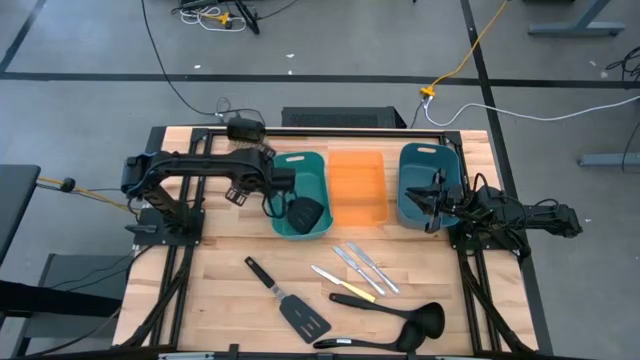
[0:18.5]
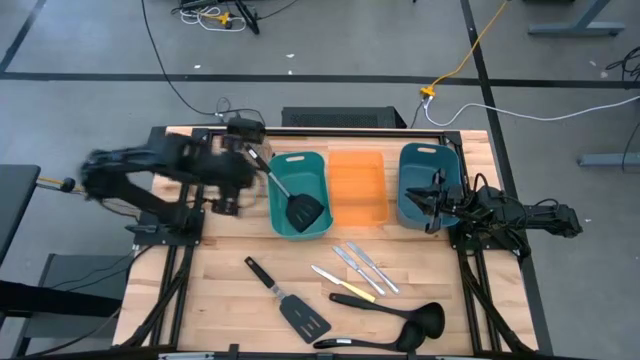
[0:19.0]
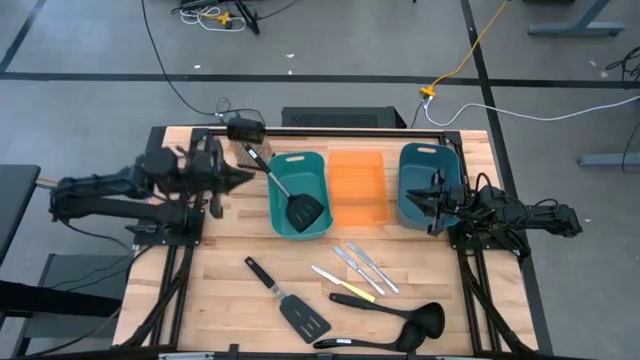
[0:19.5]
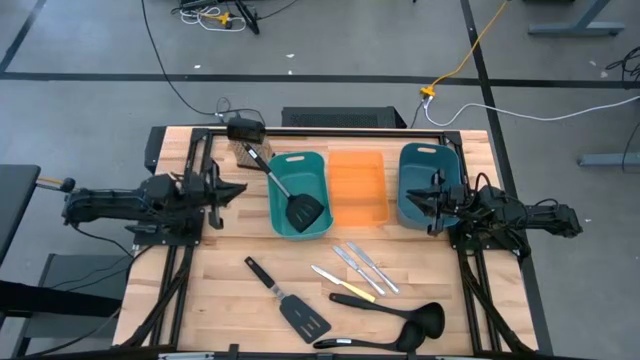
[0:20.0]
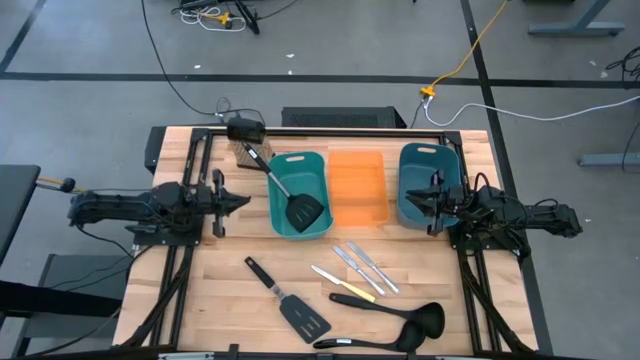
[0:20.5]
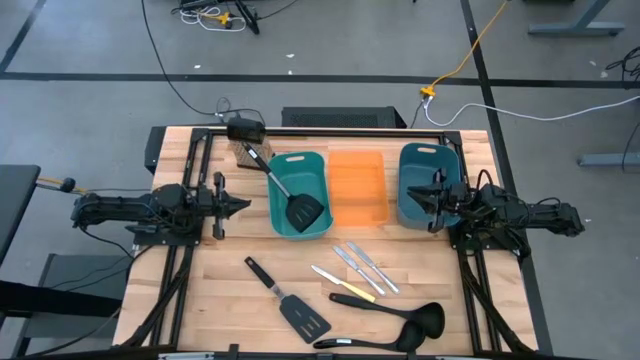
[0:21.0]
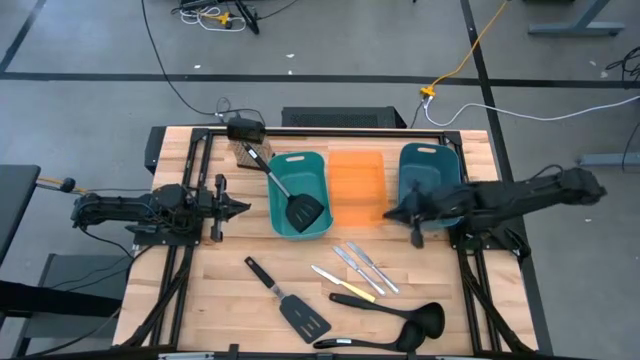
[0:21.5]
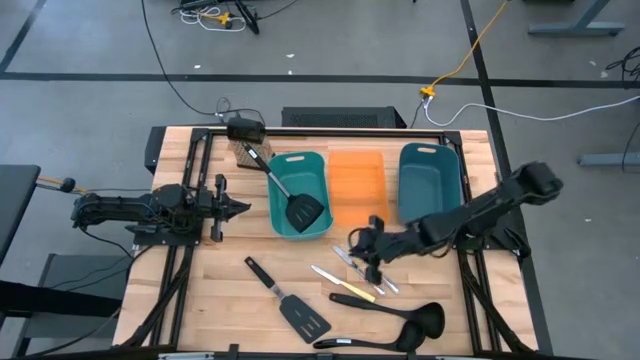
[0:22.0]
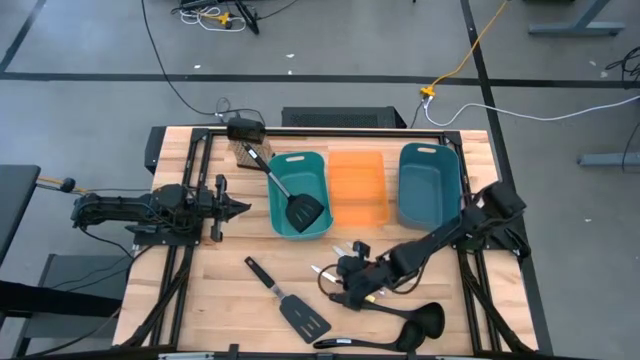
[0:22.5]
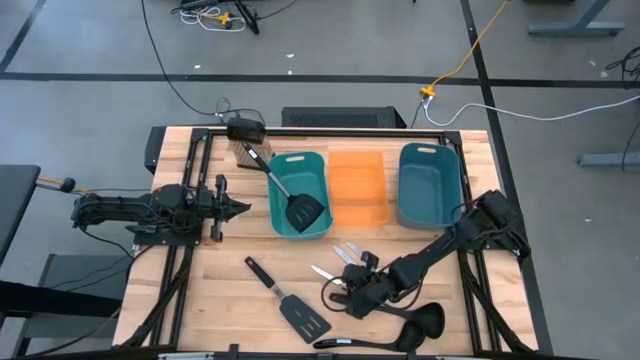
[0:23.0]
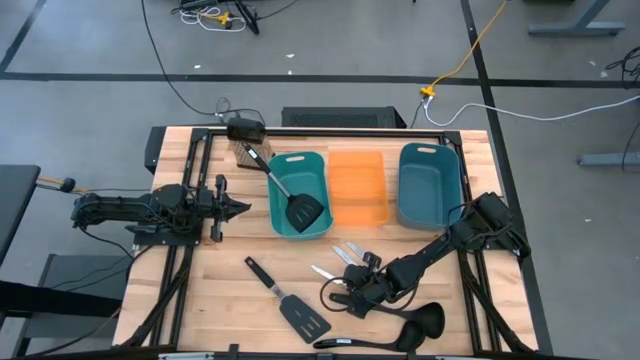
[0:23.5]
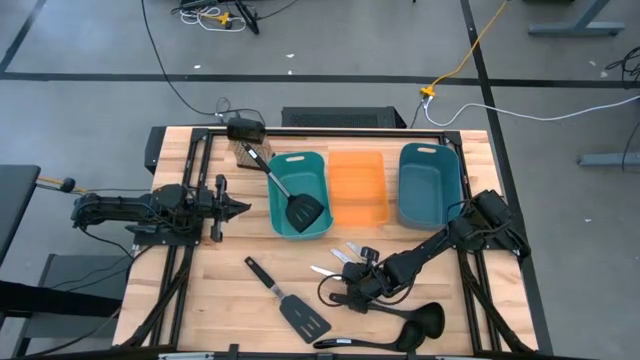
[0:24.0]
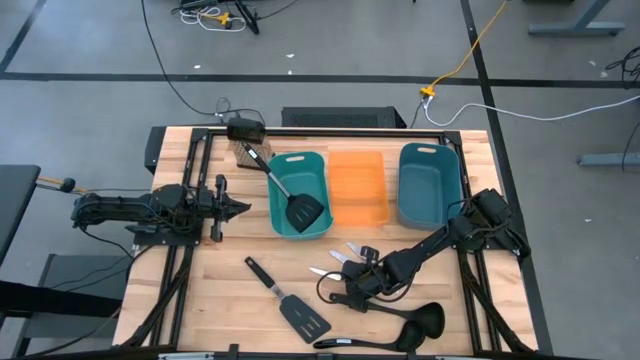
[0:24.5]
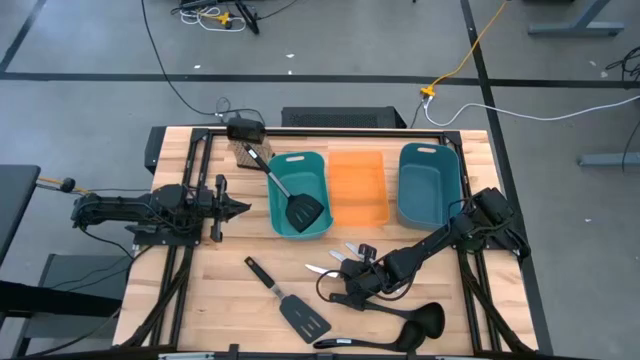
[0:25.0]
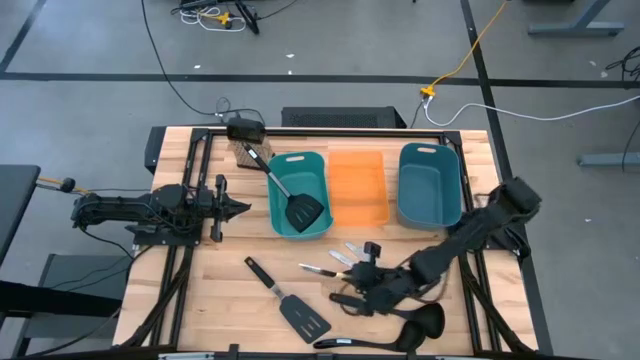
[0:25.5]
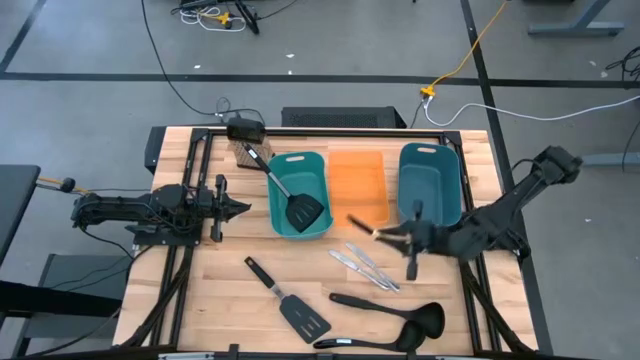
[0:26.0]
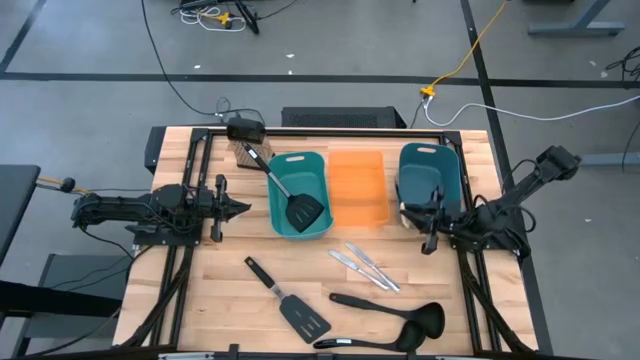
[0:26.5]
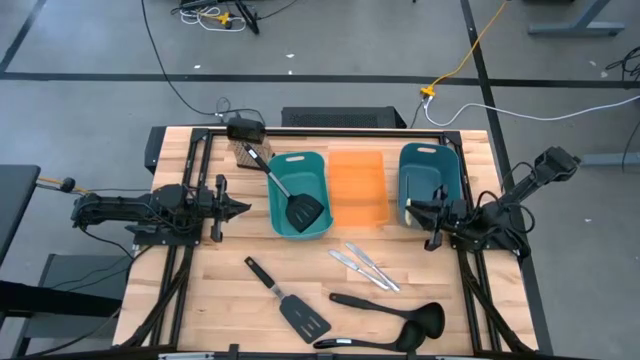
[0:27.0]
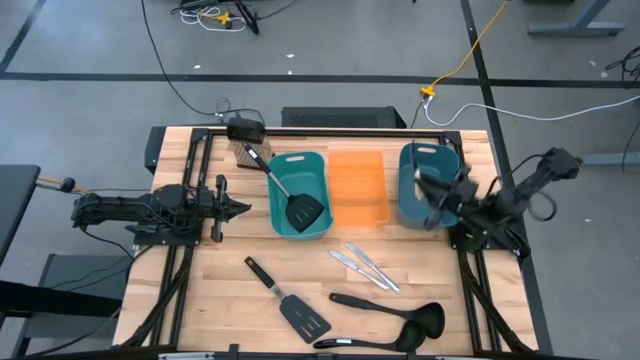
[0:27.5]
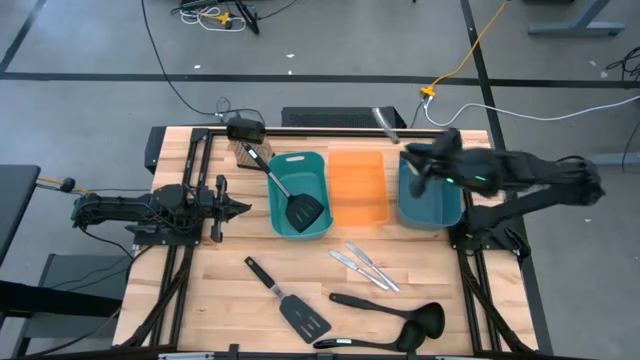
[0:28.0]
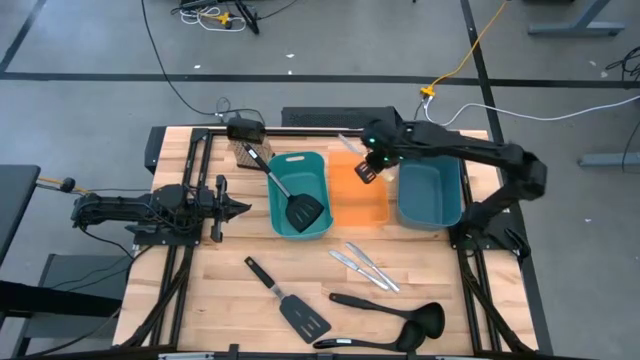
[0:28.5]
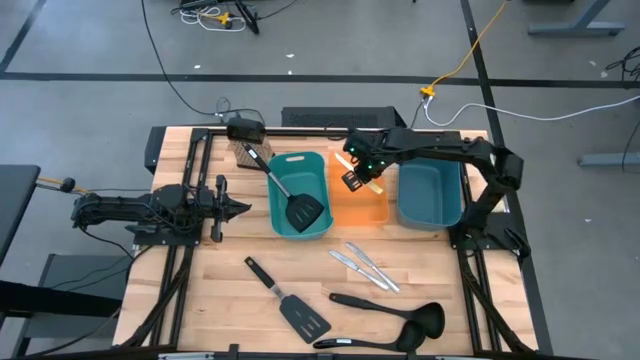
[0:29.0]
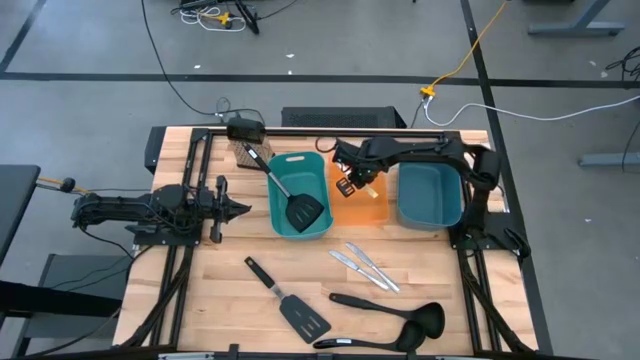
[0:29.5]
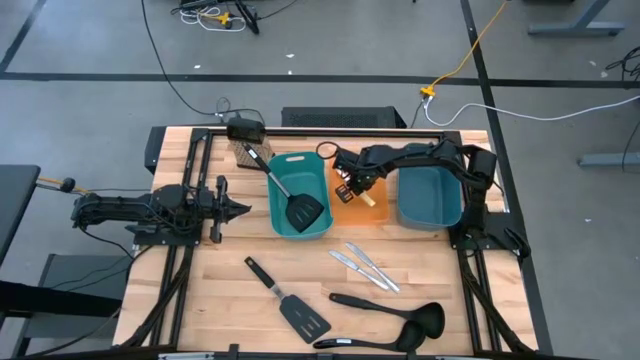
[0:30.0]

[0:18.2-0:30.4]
Task: Pick & Place Kitchen Items
Put the yellow table knife into the orange bin

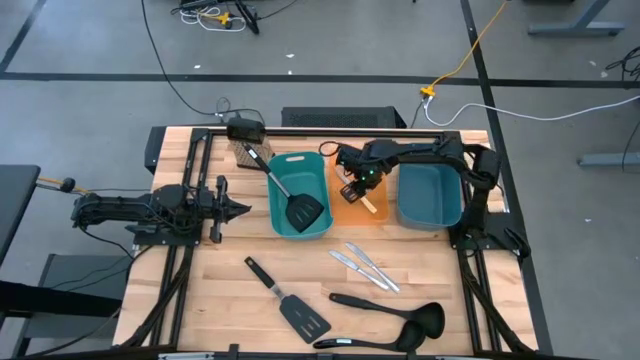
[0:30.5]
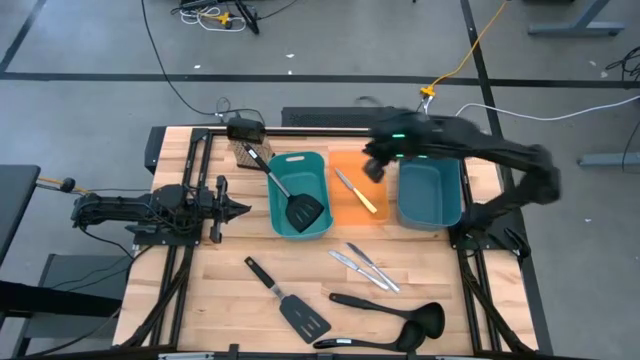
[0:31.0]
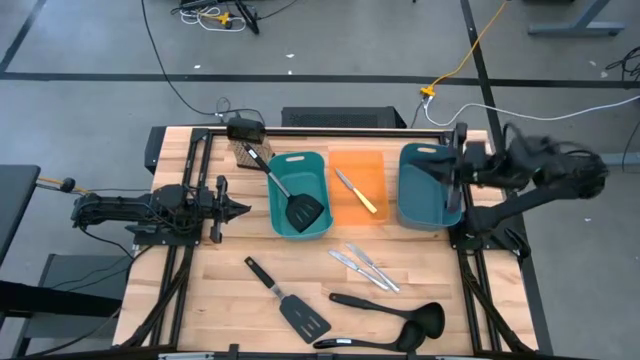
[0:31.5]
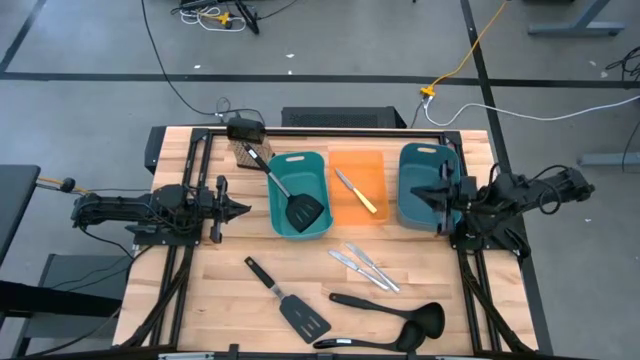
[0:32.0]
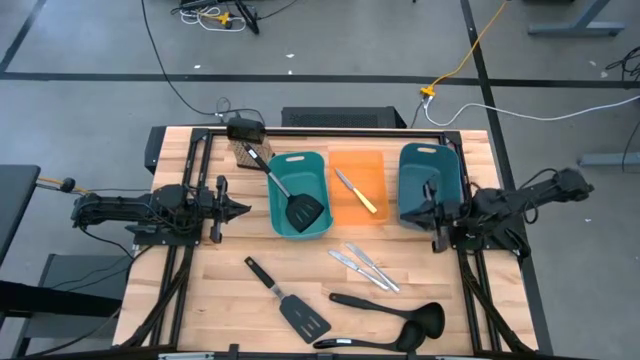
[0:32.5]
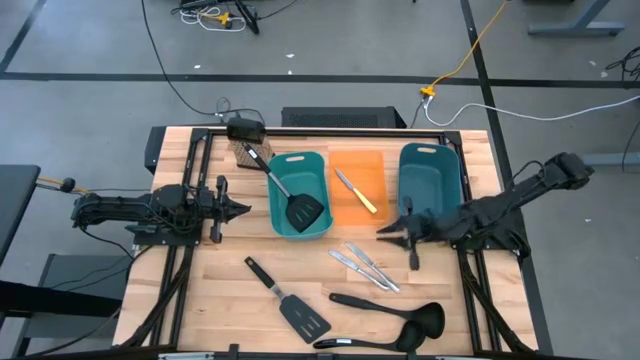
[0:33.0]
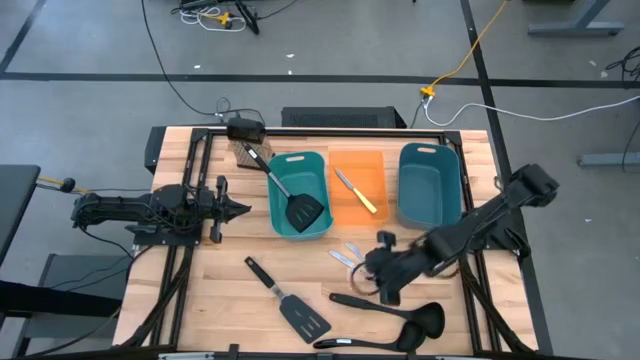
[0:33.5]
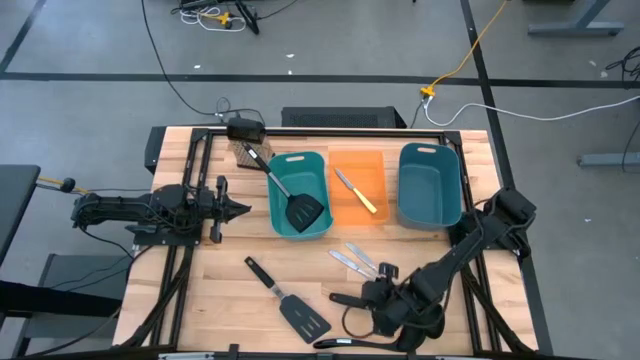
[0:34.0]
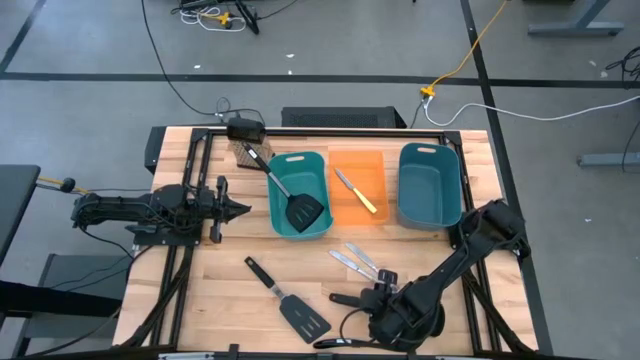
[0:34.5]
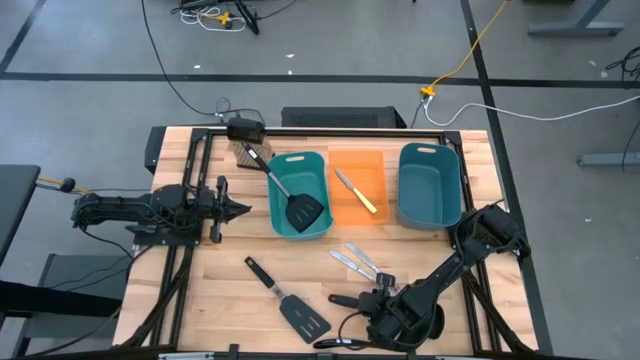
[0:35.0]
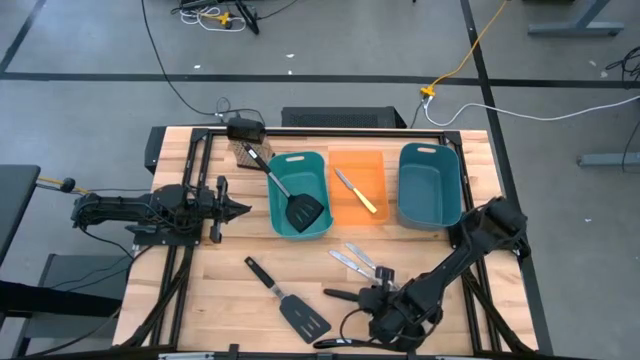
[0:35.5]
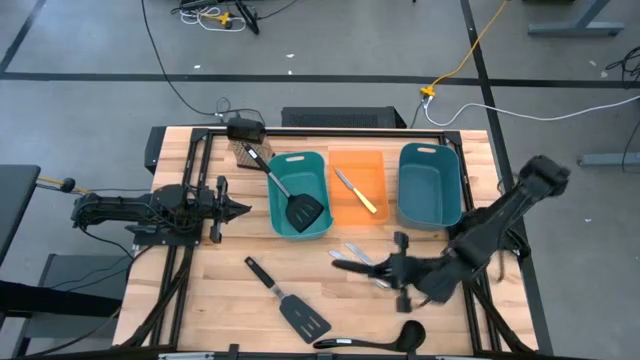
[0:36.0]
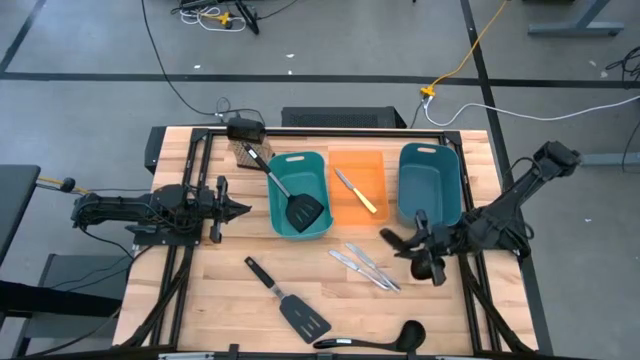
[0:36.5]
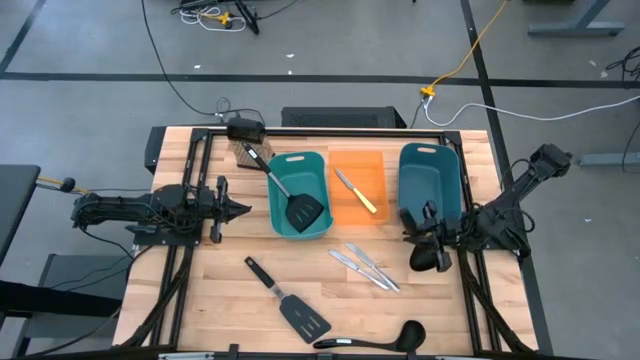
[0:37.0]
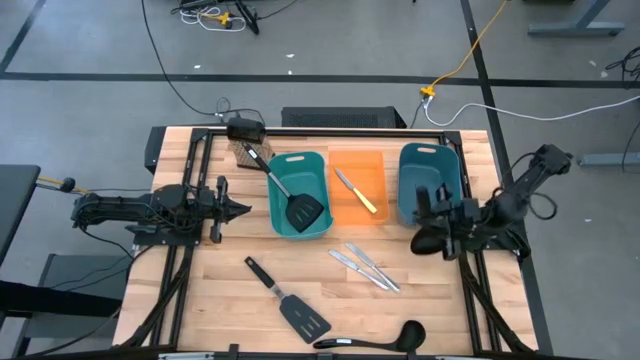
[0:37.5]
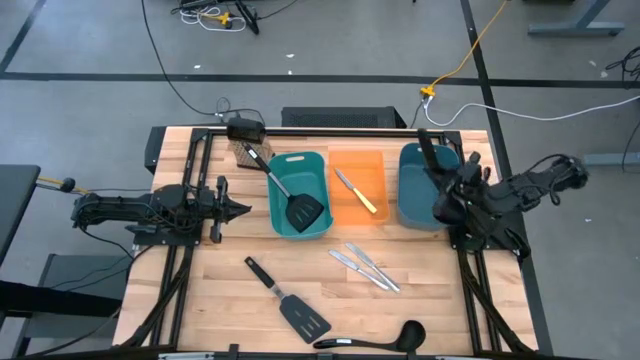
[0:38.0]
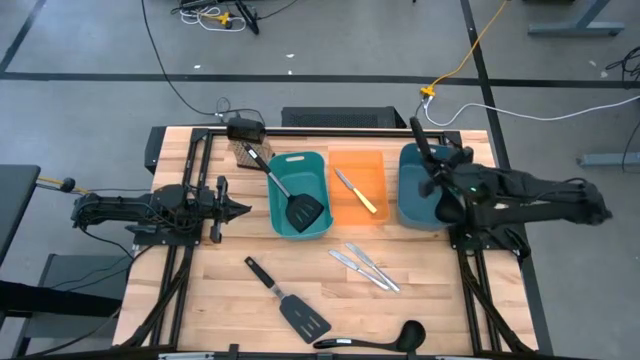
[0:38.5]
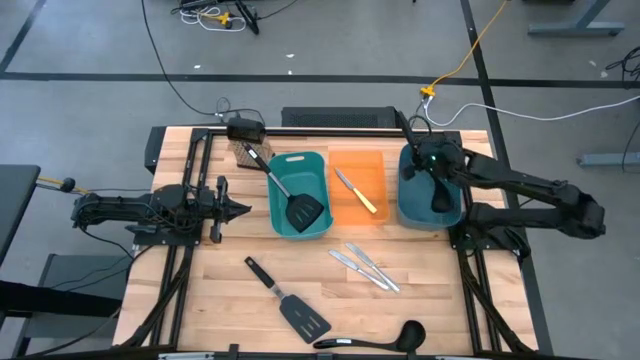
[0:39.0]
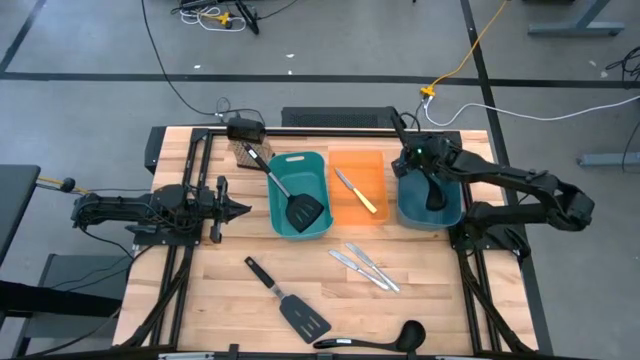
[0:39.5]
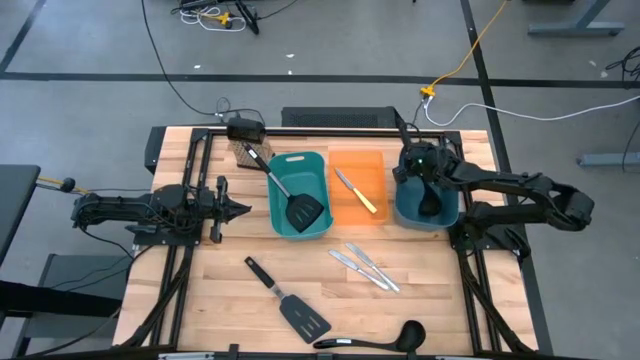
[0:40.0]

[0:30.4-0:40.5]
Put the top black serving spoon into the blue bin
